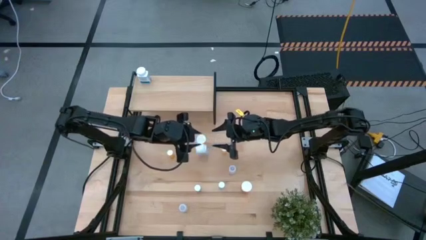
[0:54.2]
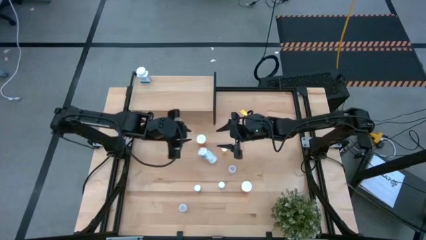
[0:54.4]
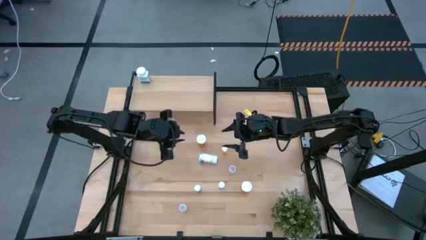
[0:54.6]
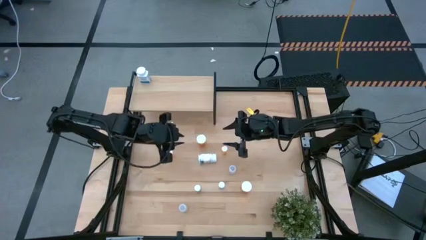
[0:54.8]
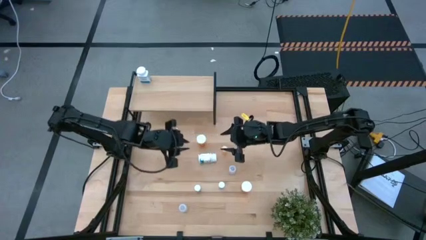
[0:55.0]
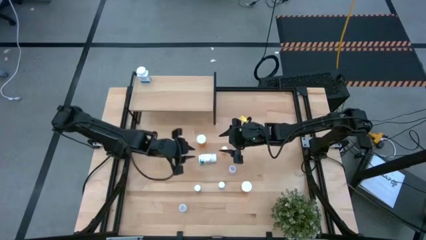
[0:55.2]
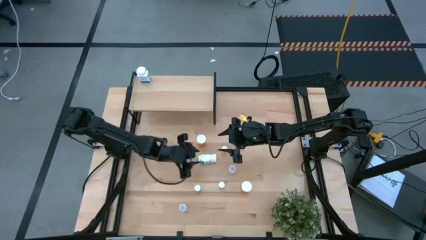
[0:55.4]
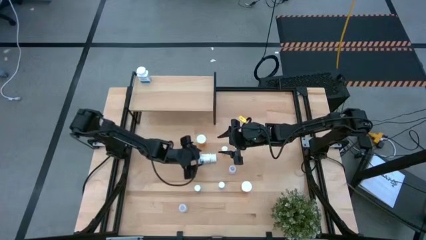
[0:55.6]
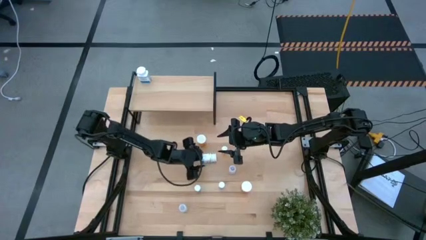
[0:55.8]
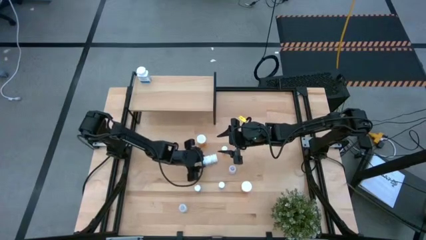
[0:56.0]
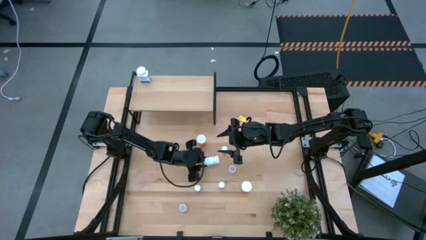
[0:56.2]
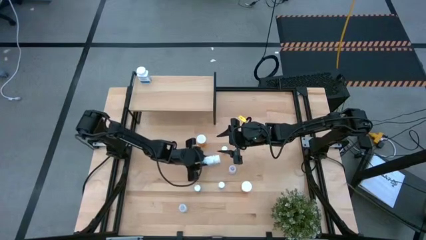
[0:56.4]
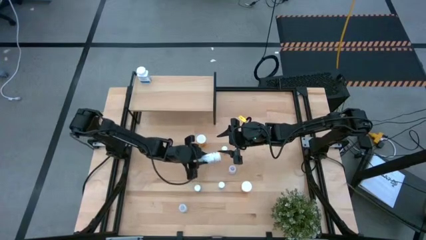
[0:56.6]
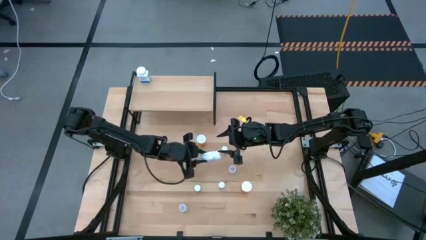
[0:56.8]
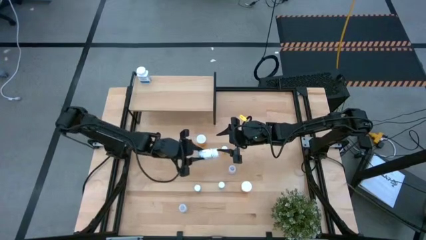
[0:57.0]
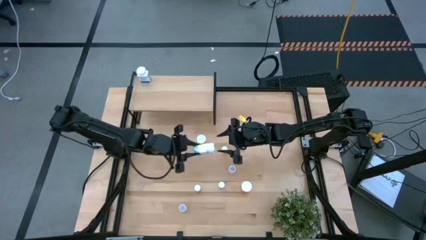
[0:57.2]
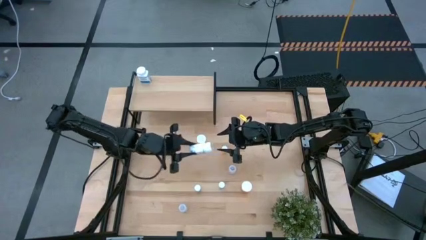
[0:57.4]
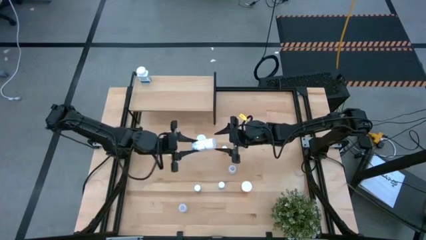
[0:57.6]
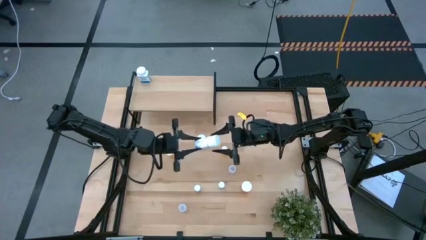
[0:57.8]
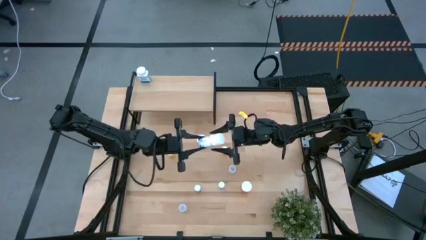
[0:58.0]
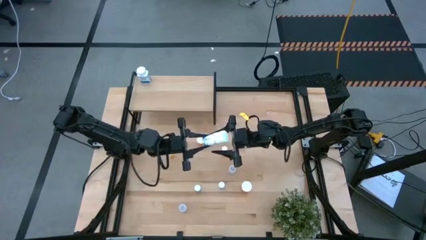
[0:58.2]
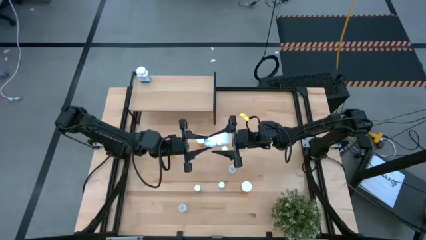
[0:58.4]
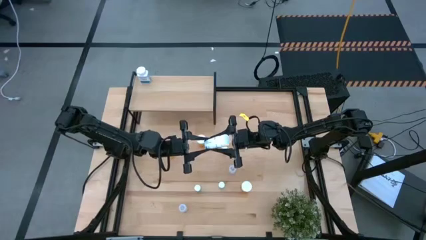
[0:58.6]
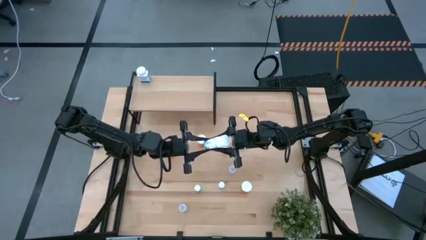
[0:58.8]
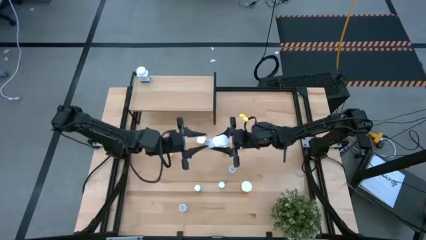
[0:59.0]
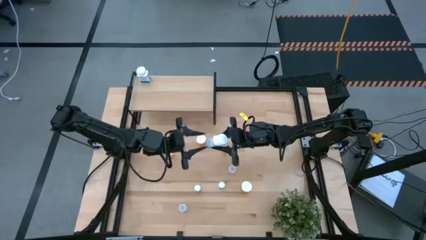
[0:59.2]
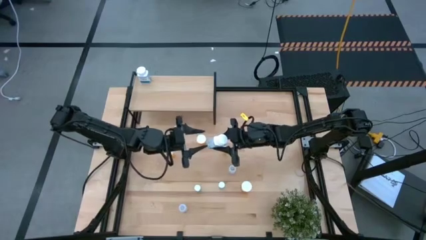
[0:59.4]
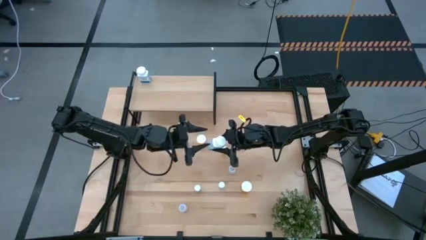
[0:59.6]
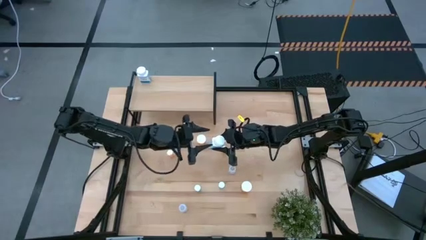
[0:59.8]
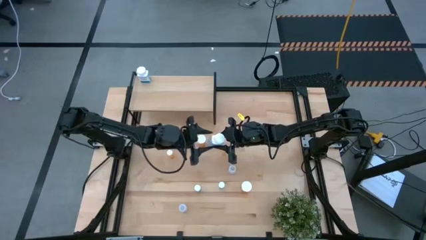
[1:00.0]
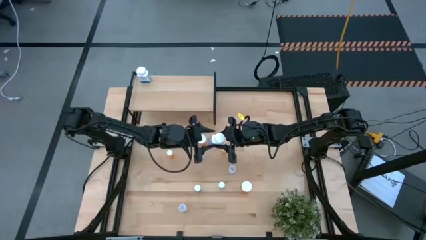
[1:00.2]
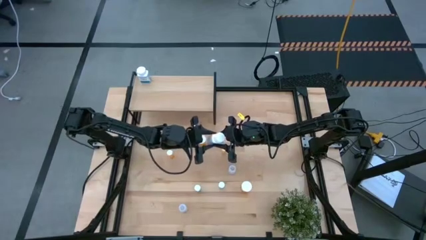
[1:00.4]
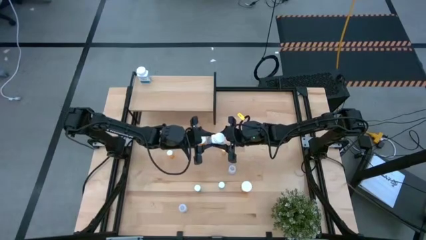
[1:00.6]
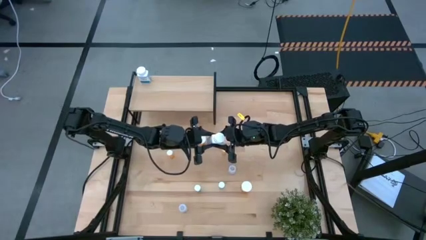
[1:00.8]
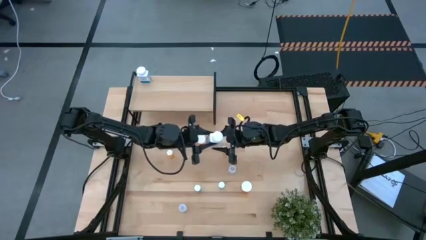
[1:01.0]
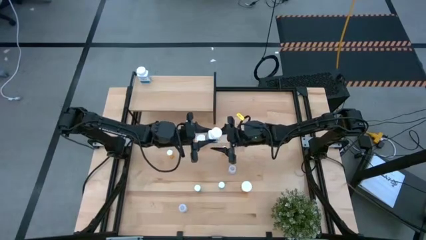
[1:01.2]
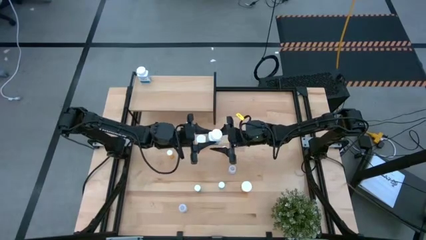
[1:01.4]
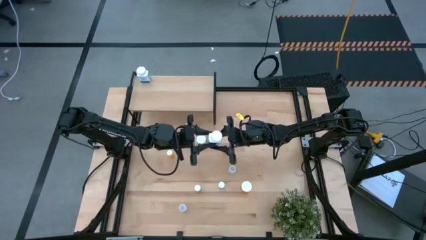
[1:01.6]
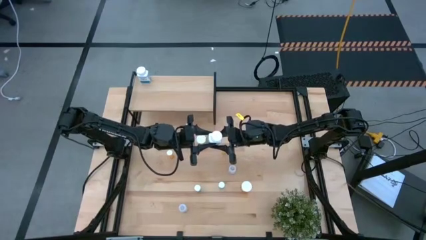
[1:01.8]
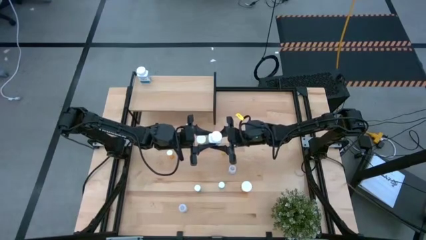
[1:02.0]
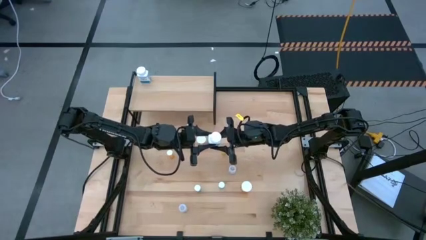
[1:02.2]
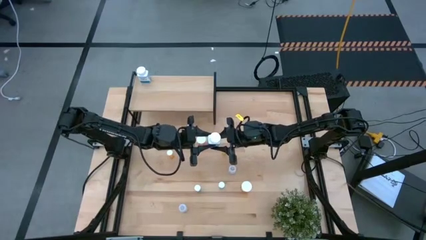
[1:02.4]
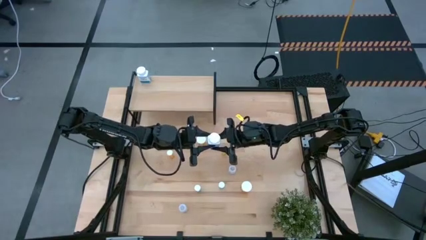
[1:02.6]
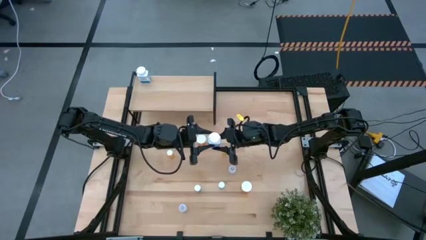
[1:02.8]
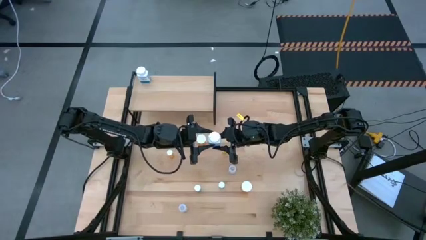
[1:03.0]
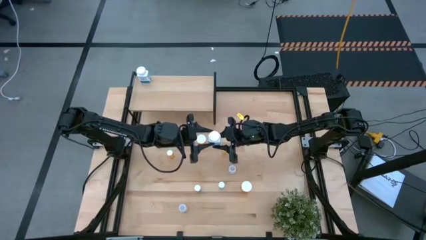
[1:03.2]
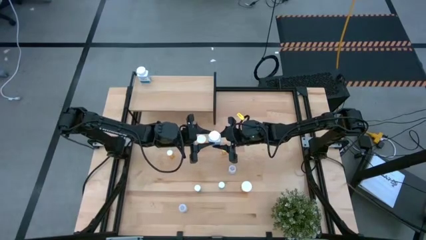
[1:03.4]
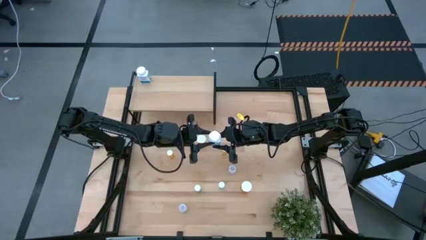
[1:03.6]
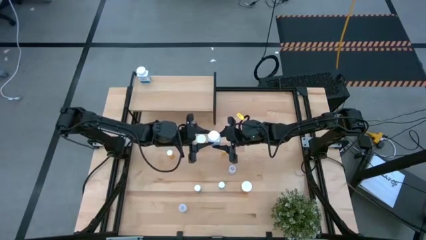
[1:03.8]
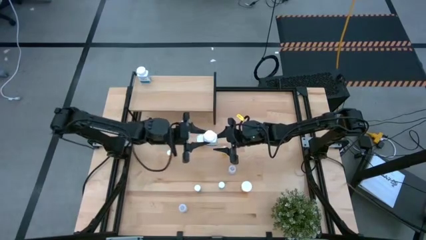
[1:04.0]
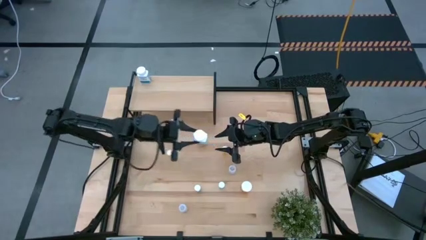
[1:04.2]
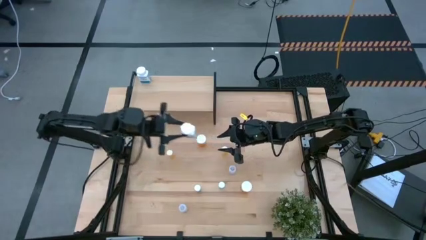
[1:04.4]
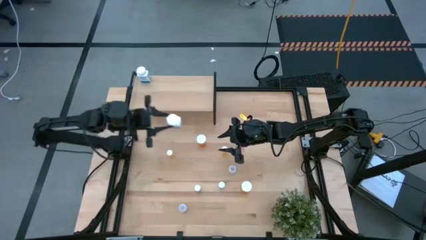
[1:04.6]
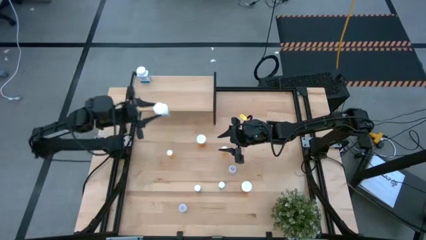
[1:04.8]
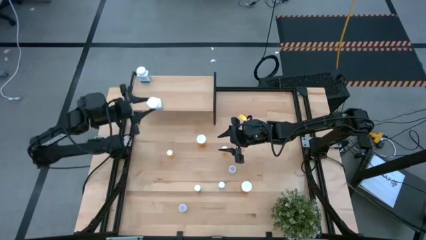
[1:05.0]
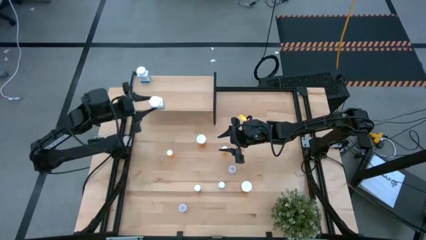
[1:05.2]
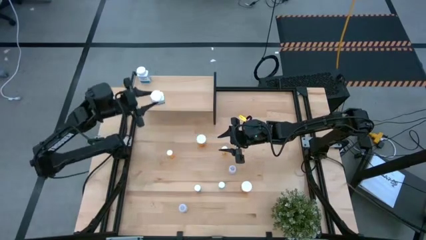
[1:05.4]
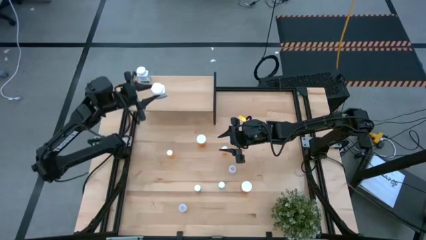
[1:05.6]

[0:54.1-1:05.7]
Task: Pick and place medicine bottles onto shelf by color
Put the white pill bottle on the shelf aligned with the other white pill bottle

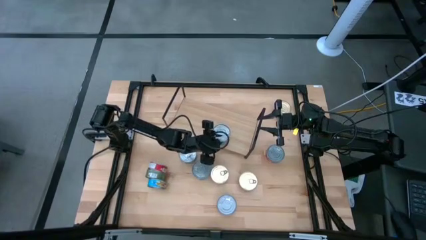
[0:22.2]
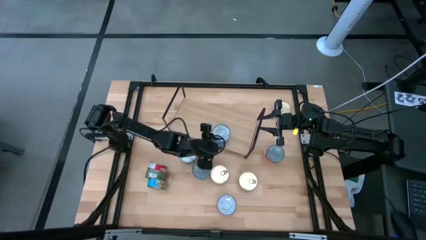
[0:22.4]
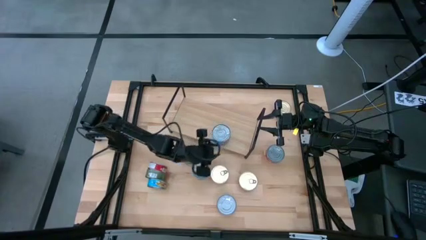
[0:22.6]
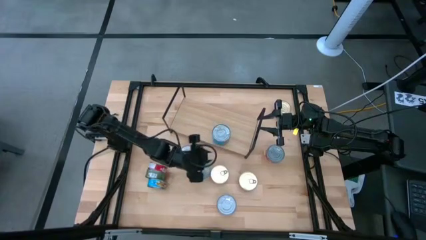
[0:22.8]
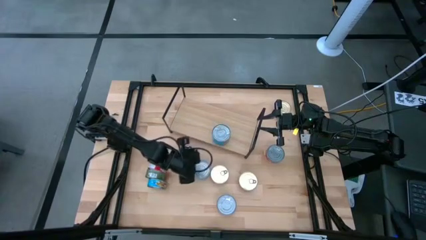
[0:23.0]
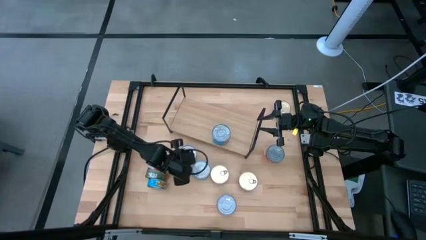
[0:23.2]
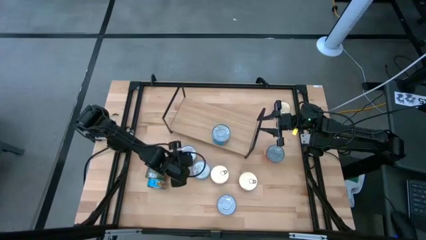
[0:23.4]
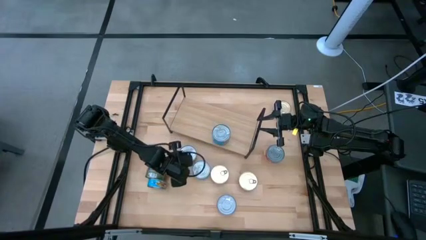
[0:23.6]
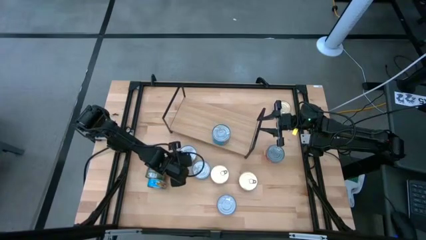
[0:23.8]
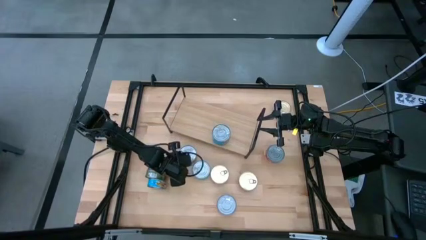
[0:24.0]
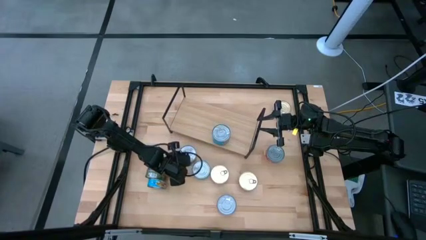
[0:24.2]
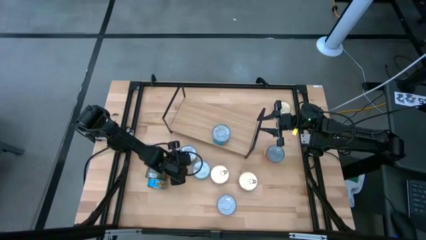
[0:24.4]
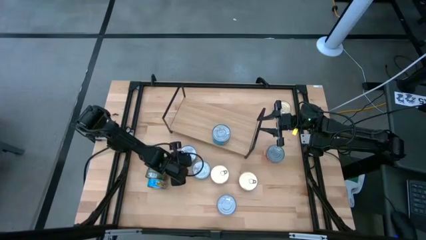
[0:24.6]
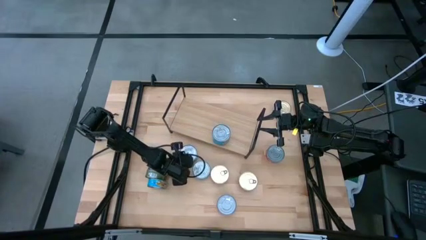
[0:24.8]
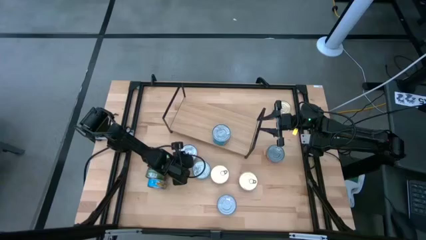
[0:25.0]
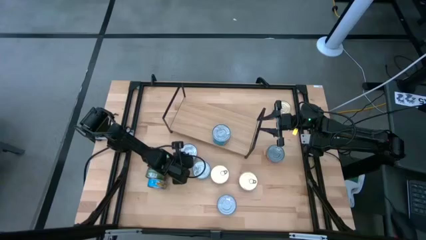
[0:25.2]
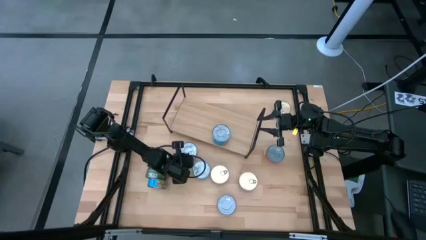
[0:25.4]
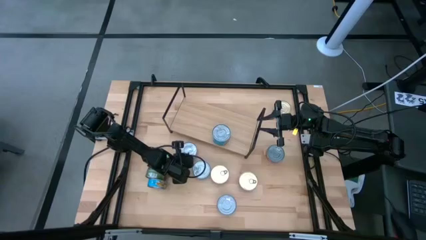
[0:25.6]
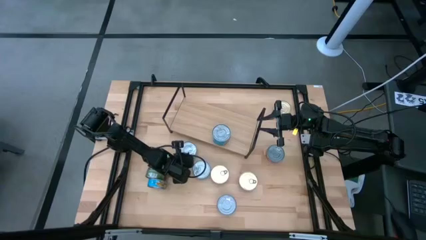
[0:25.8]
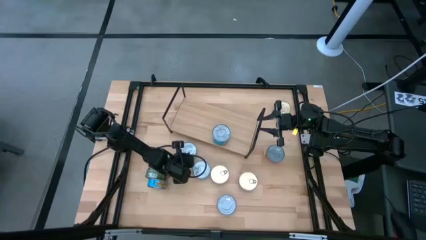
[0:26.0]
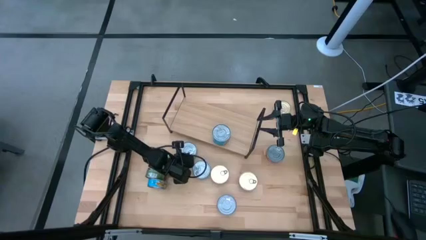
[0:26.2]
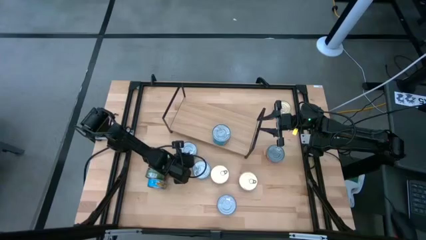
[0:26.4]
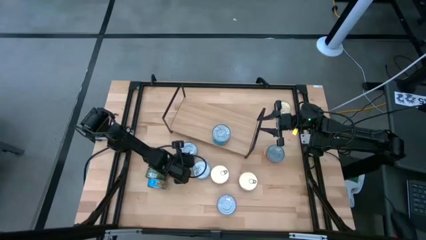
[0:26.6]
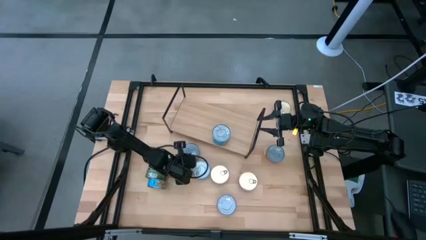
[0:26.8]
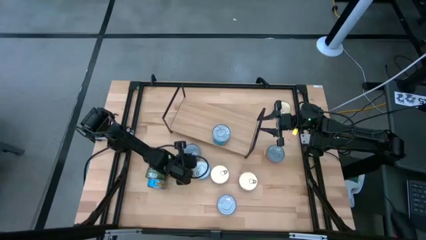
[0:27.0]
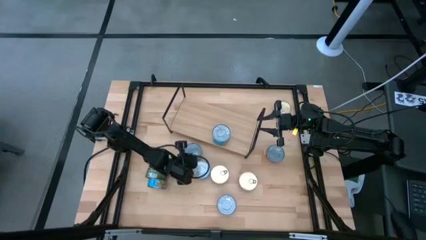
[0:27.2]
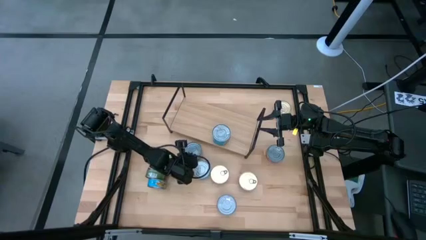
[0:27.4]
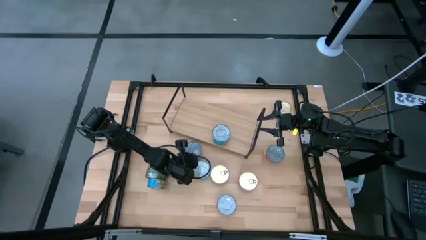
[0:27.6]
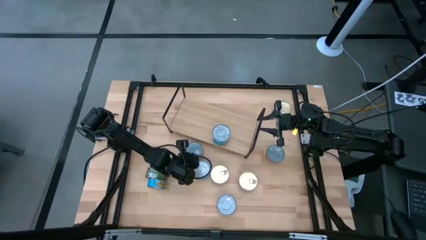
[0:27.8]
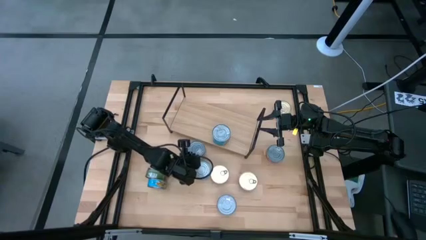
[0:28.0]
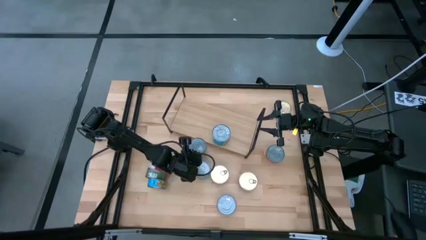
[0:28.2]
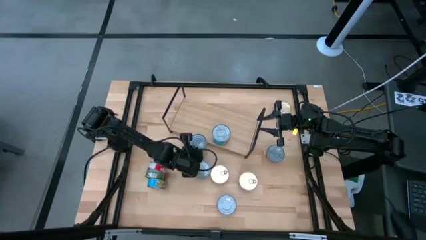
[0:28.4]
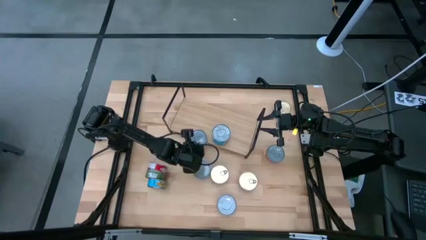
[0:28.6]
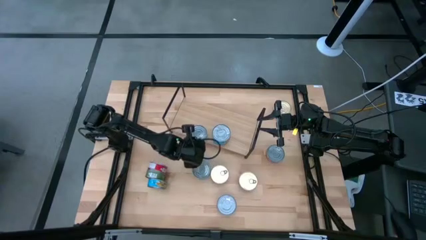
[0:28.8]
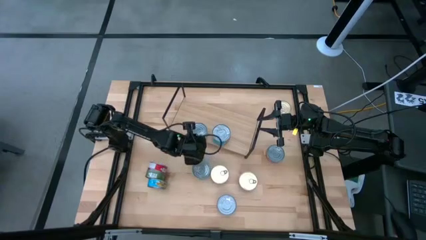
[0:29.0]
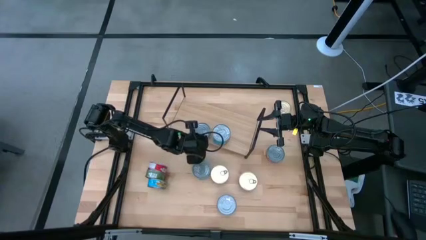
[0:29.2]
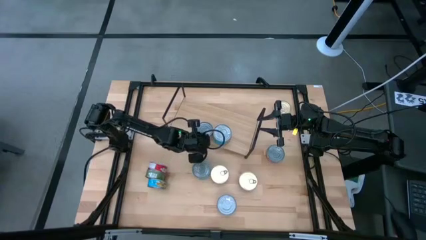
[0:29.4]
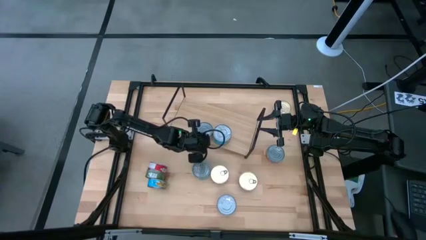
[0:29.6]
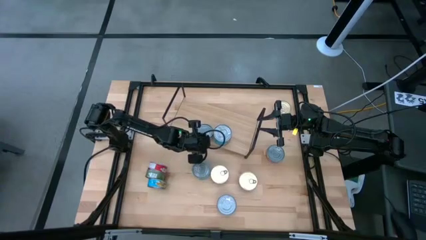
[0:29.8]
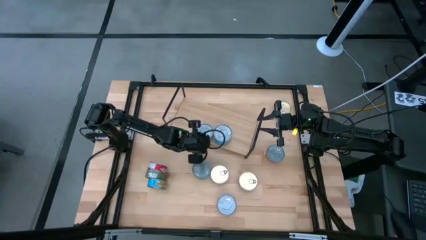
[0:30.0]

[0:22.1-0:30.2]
Task: Stack canned seafood by type on shelf
Put the green tuna can on the shelf
